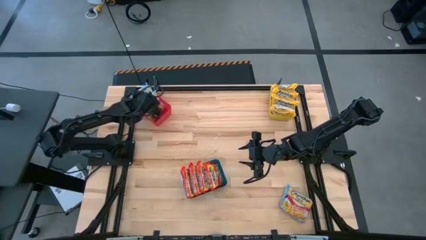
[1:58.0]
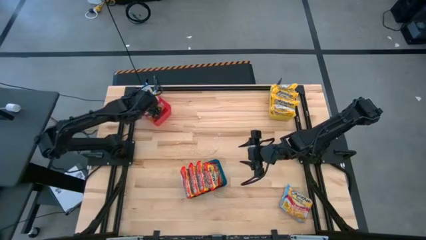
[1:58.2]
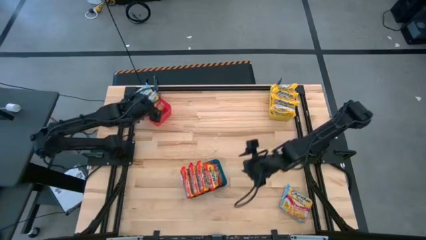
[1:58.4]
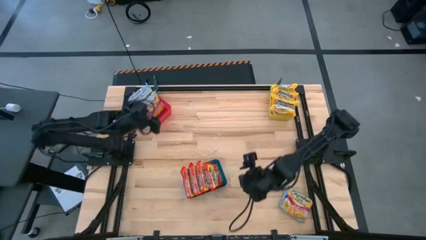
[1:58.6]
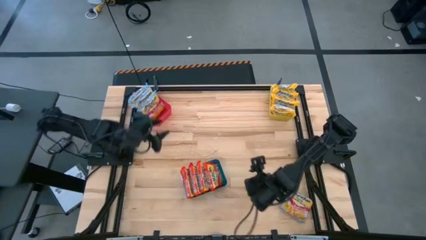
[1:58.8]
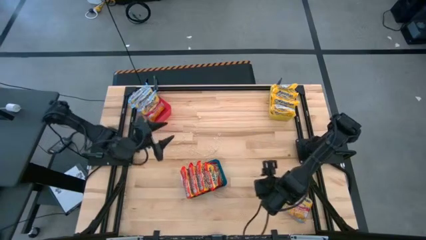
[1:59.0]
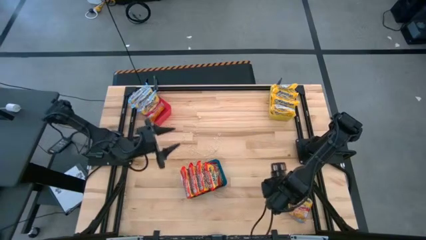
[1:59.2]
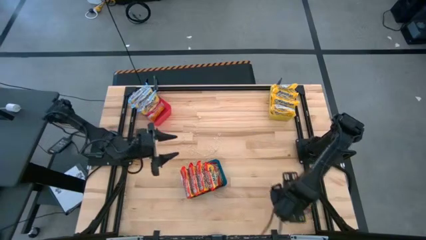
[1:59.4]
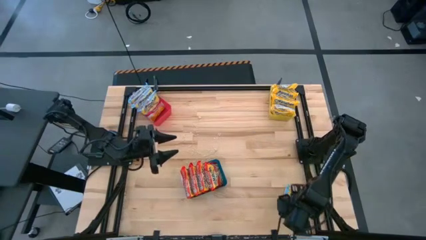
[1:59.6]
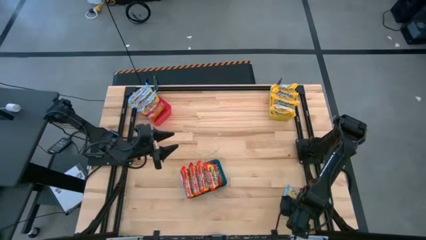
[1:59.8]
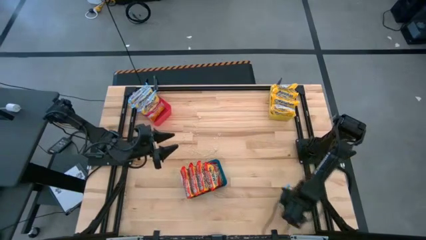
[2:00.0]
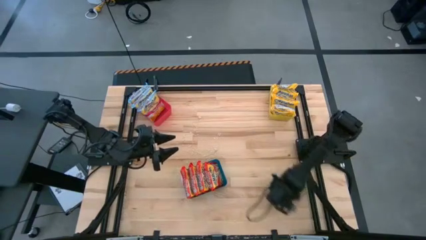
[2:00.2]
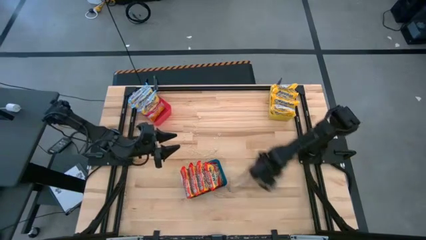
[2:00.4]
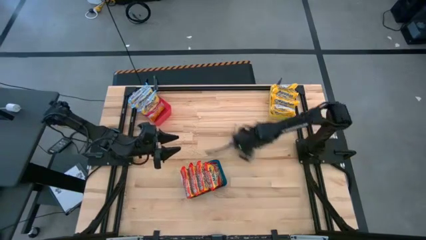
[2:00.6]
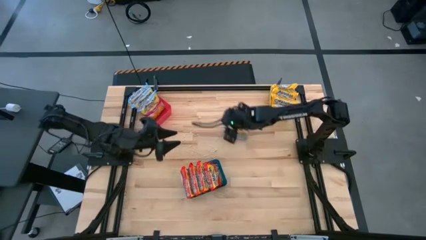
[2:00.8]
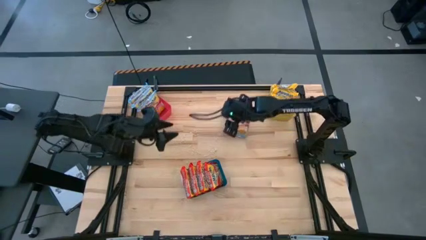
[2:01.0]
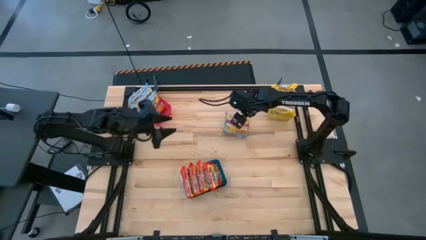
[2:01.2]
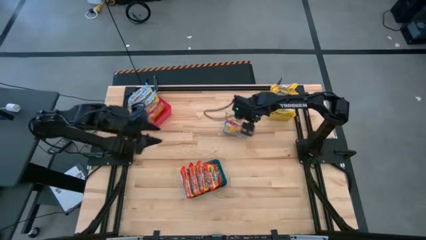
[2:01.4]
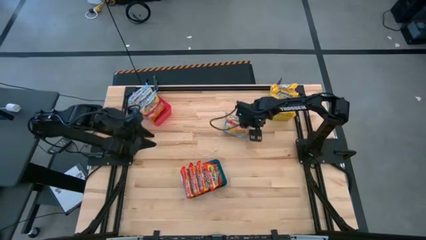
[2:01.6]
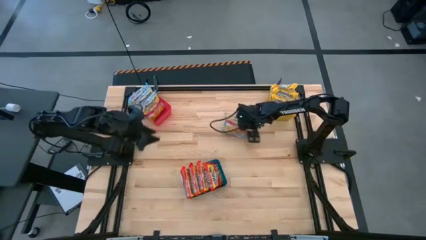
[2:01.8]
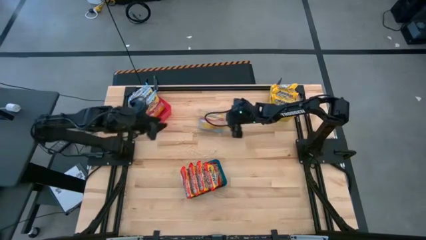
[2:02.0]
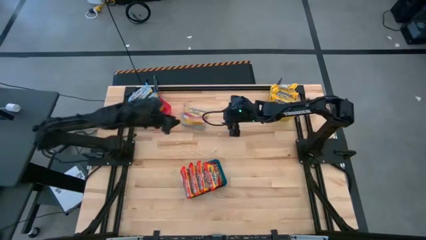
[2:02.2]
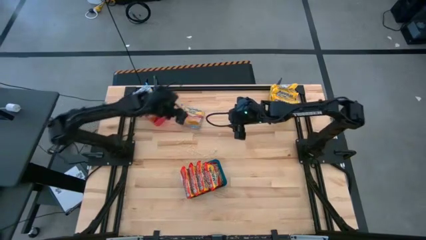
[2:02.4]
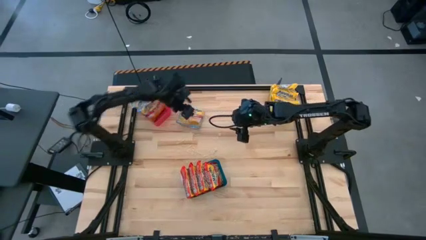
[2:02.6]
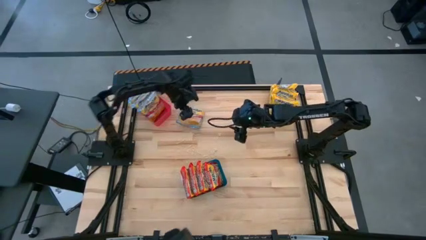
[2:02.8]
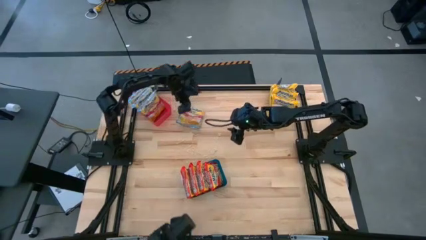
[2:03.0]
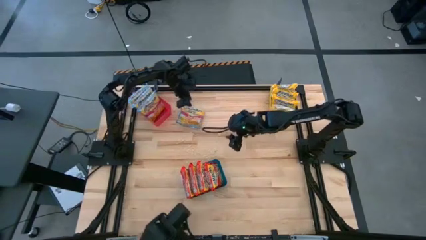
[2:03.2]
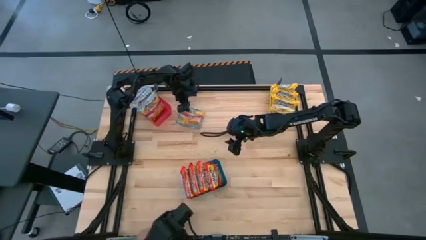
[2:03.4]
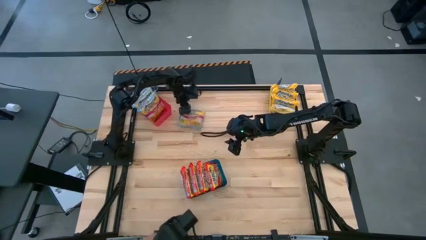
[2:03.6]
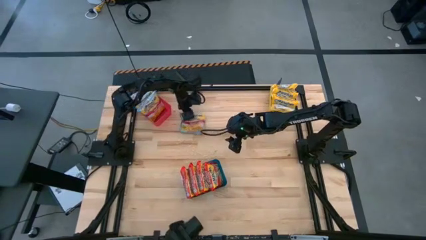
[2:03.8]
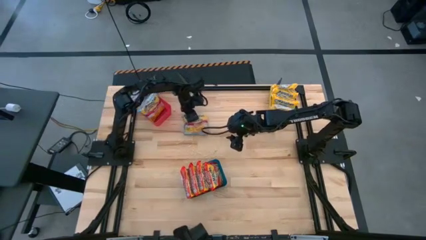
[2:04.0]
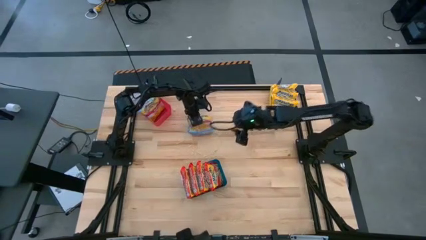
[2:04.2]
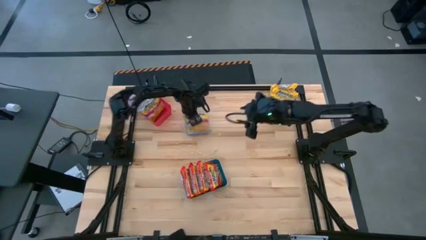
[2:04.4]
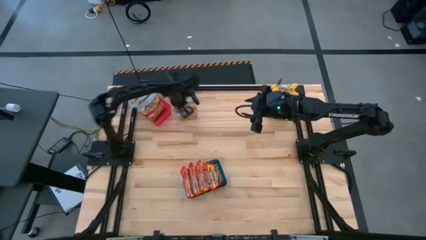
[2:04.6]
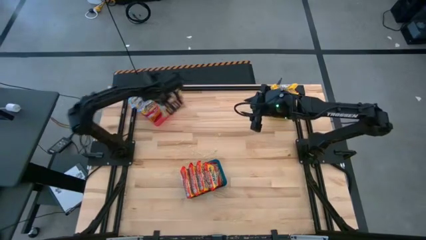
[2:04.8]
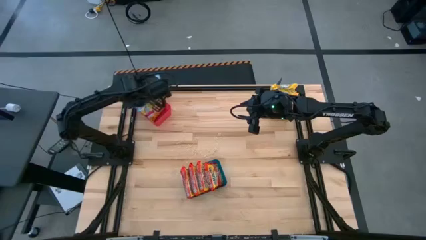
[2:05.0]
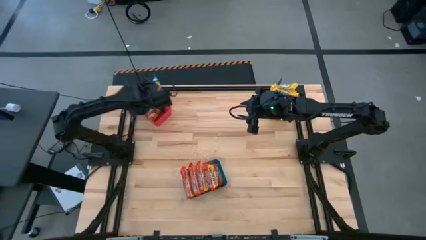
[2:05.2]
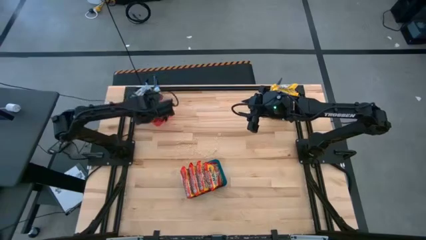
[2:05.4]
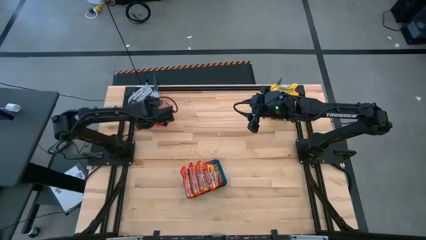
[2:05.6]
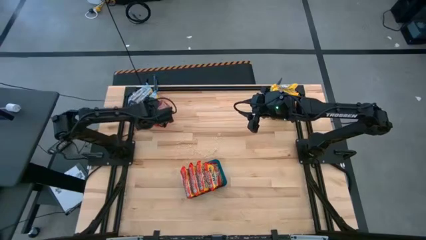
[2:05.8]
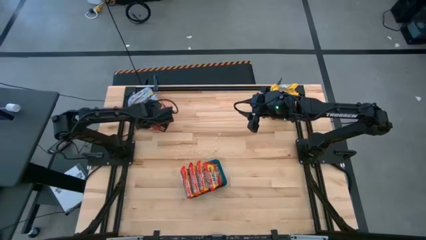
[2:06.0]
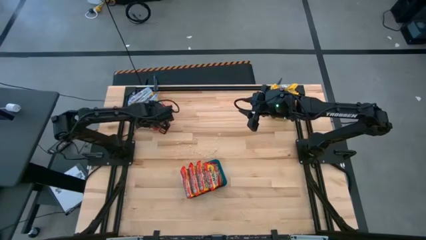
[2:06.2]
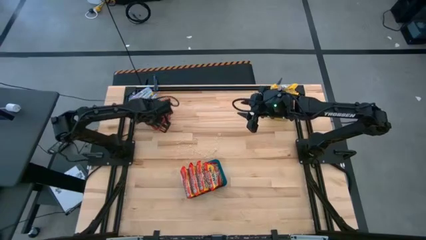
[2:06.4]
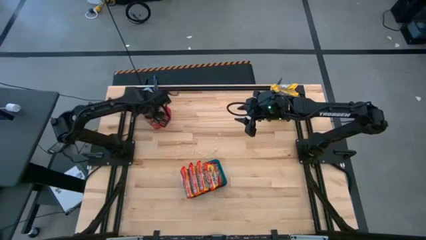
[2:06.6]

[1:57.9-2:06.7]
Task: Sort Maruchan noodles
Put the blue noodle pack into the red bin

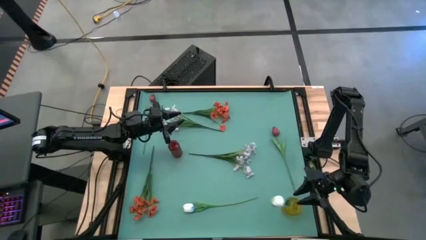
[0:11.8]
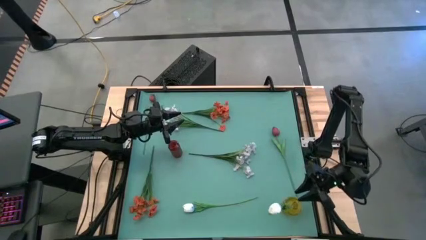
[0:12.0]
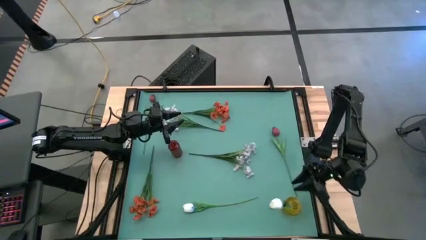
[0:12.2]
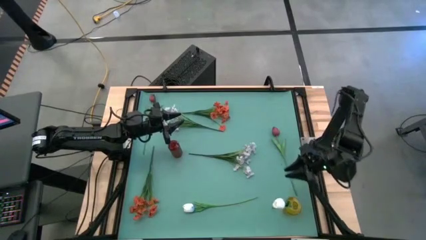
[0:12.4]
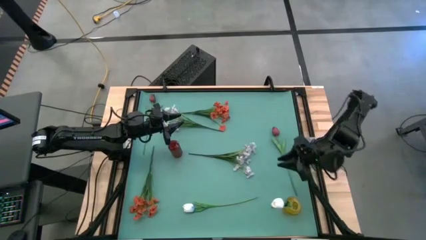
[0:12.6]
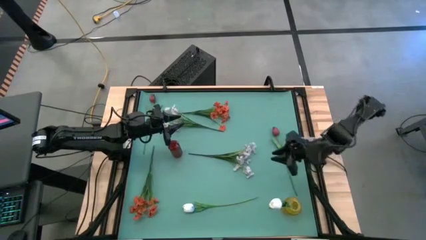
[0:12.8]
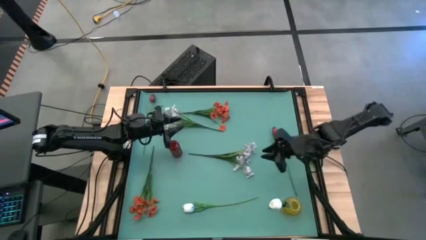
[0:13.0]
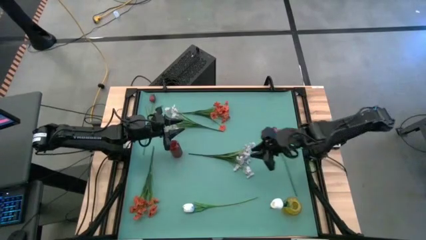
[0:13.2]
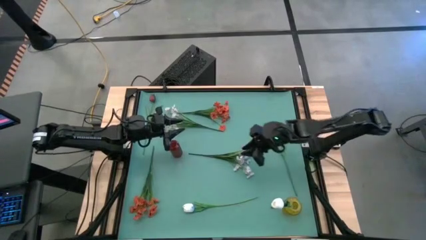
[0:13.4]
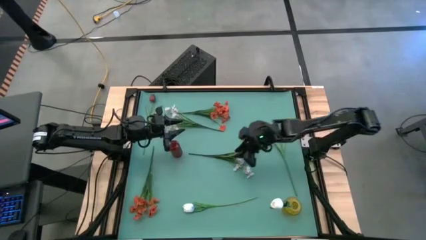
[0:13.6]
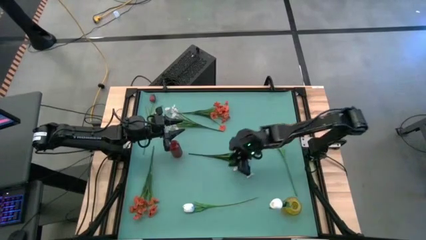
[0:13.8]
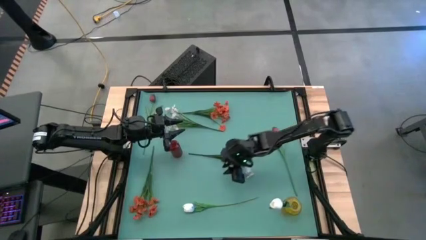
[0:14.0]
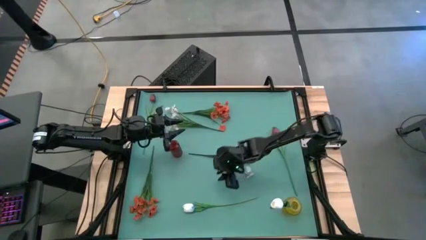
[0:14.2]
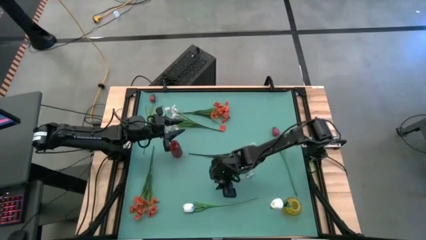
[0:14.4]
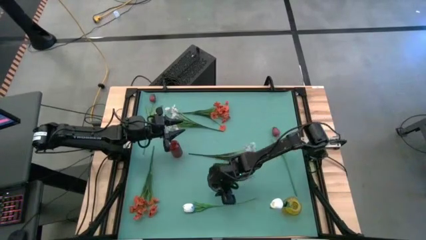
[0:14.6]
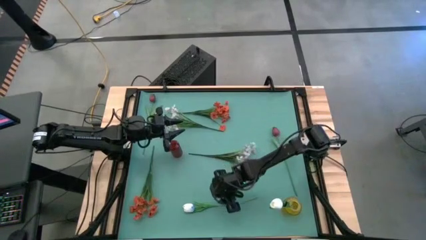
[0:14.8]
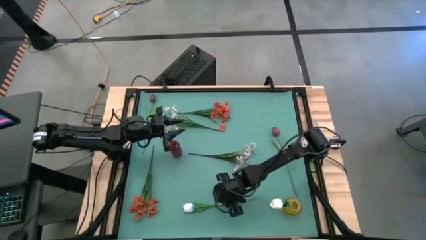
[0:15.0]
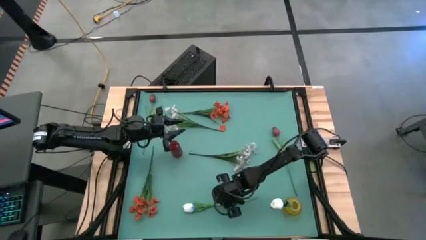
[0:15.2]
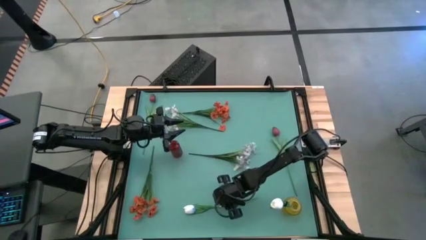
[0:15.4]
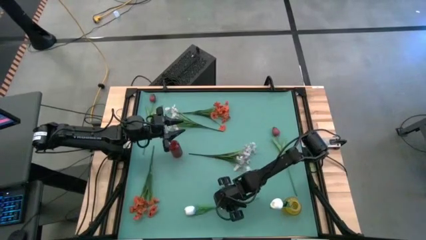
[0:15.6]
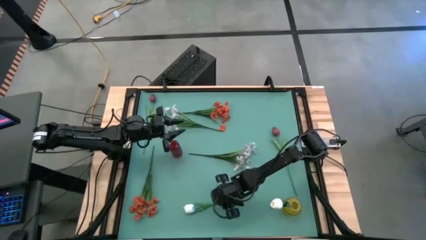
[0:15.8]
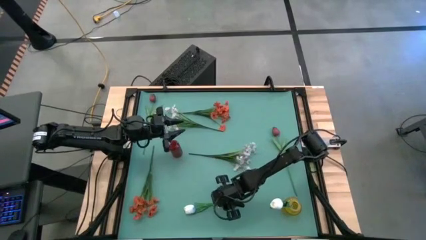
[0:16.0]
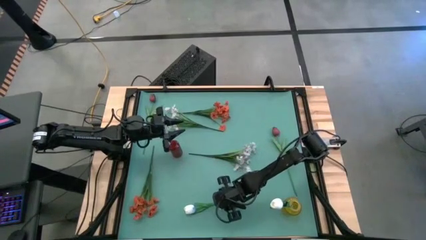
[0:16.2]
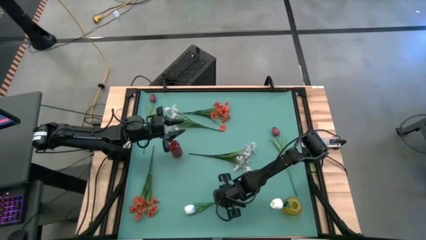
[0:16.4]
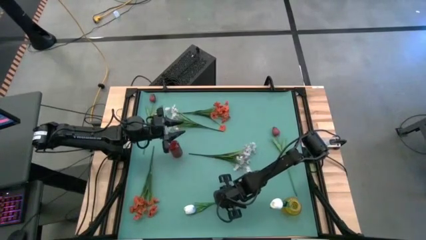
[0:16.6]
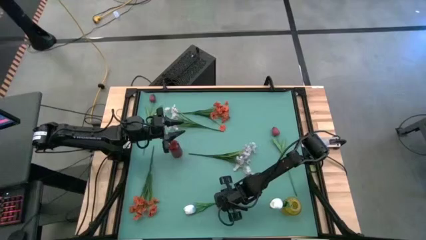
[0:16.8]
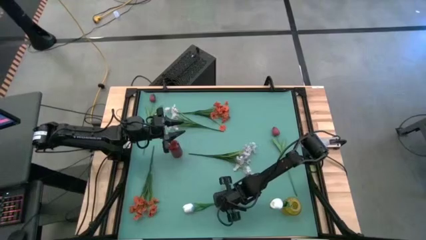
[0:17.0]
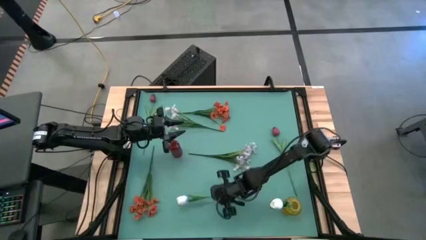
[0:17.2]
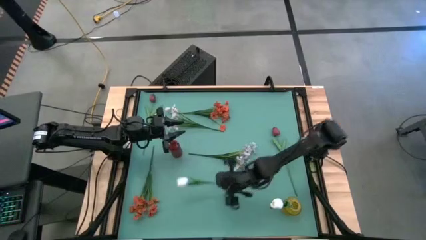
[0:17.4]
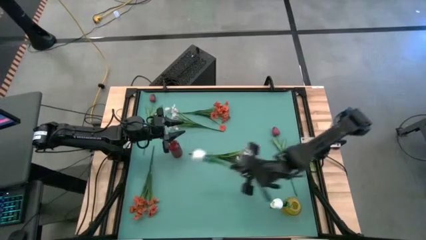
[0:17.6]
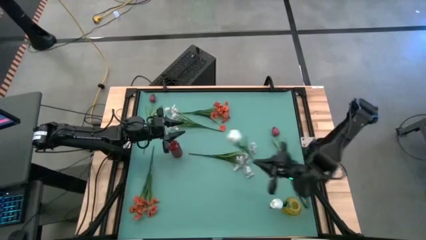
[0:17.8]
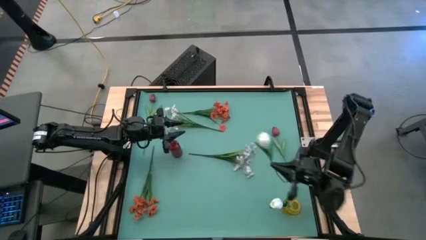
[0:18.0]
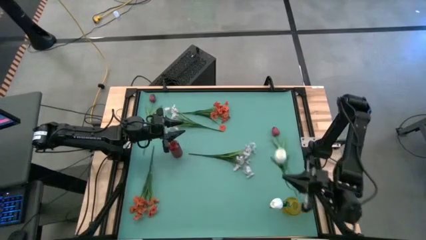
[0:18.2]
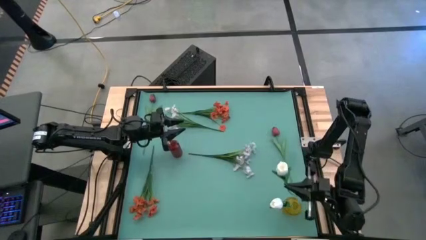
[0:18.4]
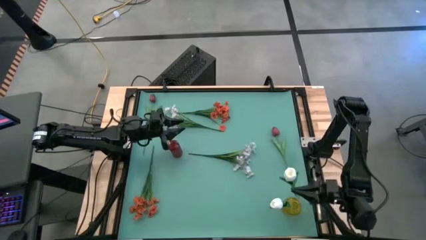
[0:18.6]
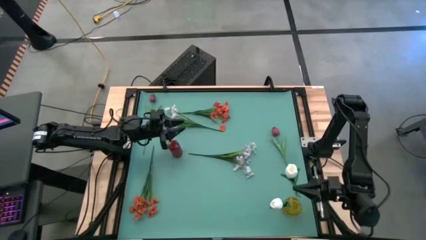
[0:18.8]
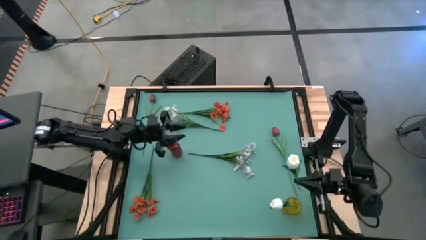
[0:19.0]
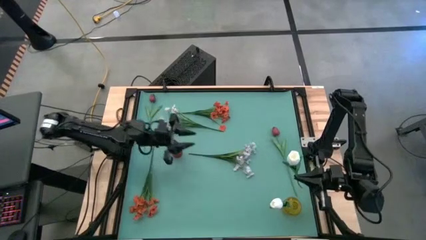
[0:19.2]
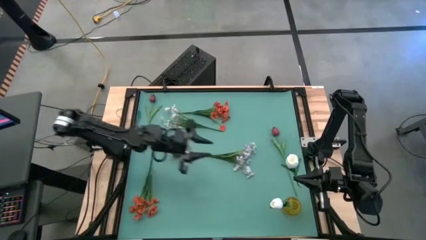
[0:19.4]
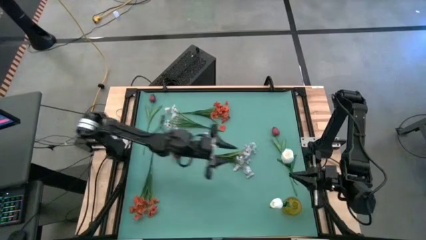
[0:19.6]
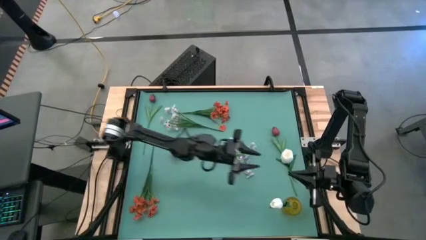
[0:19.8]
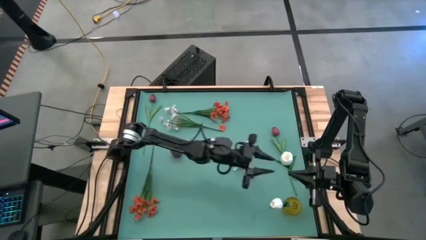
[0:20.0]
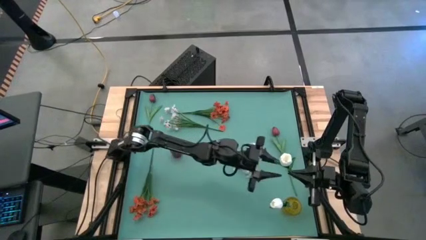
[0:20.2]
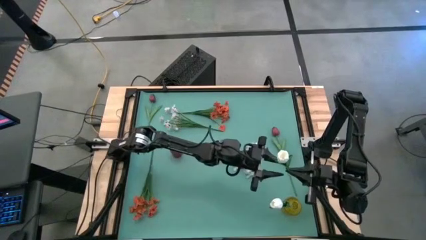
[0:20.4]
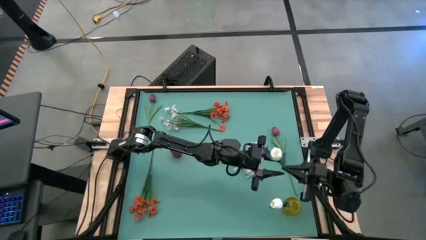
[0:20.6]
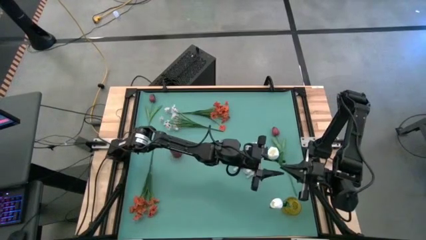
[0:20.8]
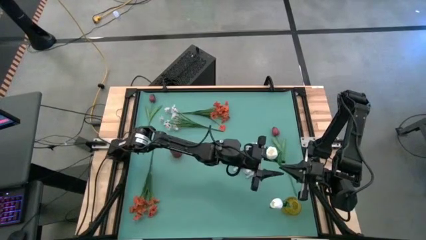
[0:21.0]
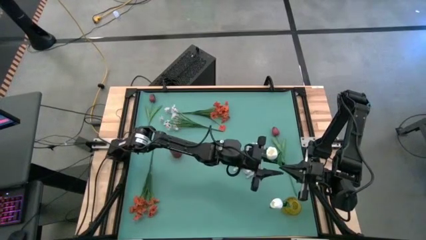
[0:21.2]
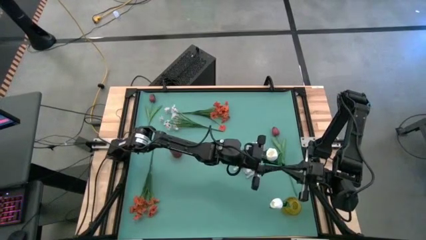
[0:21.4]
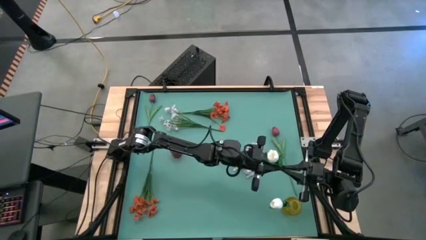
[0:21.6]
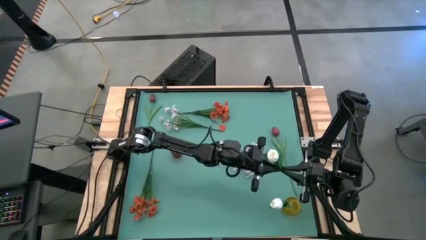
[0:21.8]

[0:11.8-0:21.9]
Task: Sort flowers into vase by color
Put the white flower into the yellow vase
